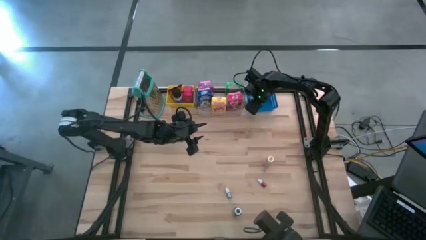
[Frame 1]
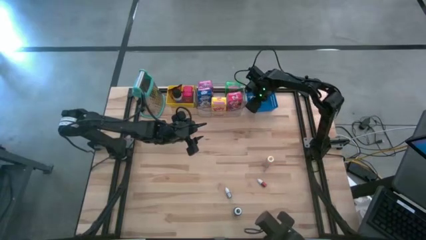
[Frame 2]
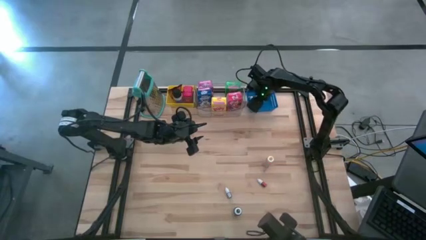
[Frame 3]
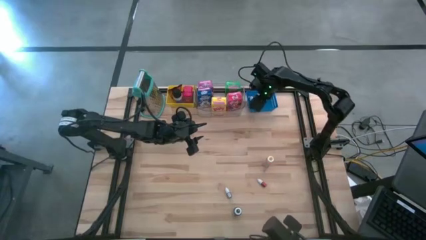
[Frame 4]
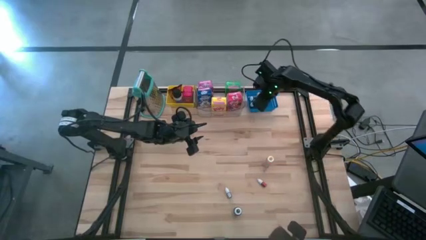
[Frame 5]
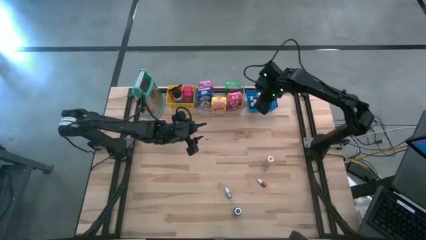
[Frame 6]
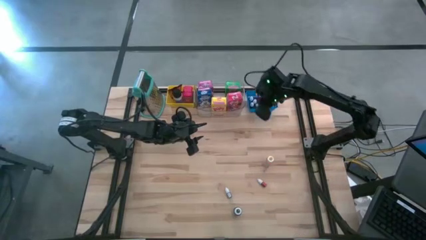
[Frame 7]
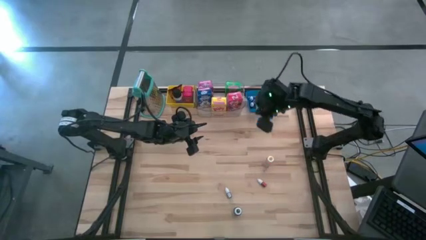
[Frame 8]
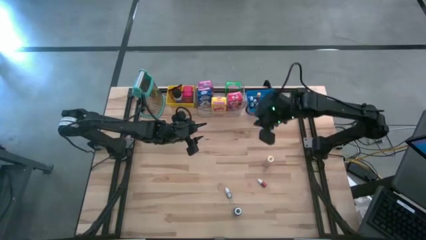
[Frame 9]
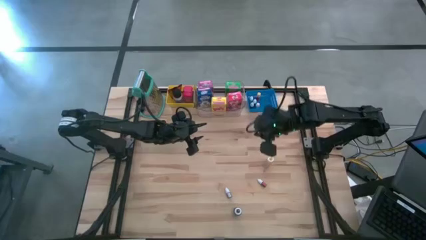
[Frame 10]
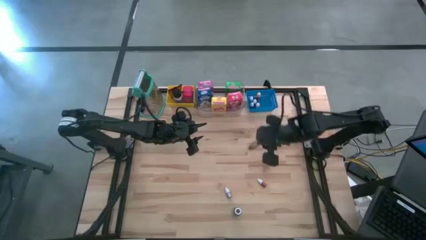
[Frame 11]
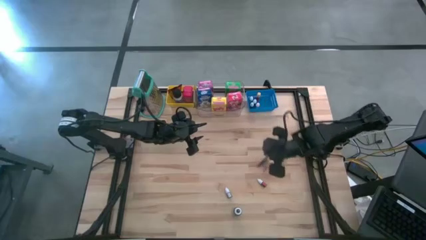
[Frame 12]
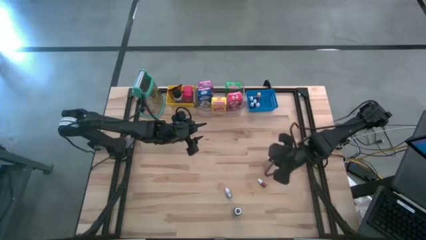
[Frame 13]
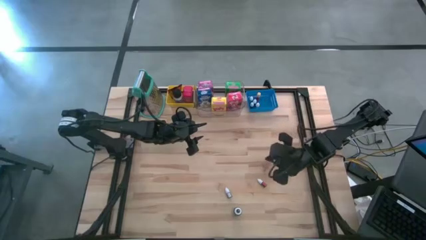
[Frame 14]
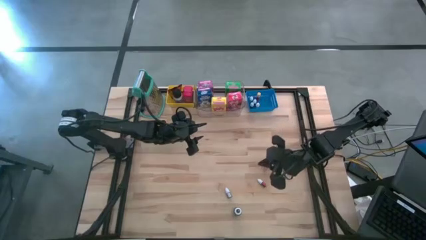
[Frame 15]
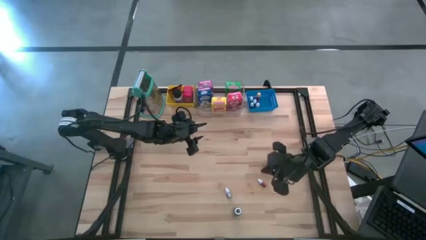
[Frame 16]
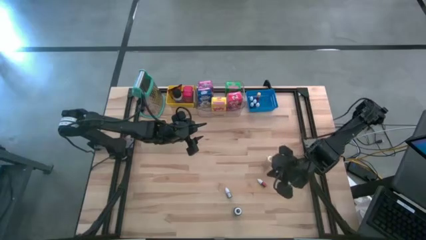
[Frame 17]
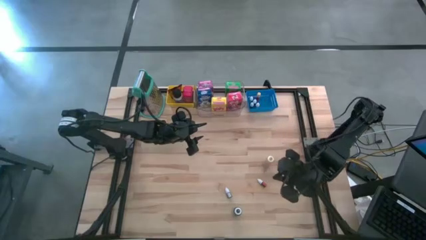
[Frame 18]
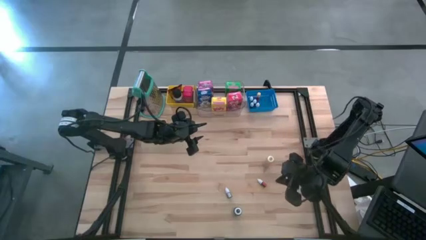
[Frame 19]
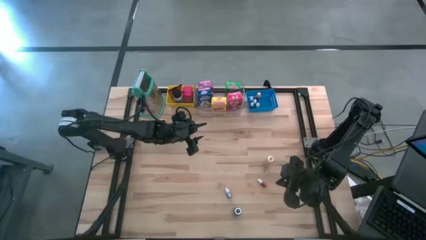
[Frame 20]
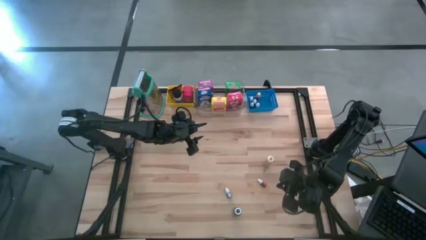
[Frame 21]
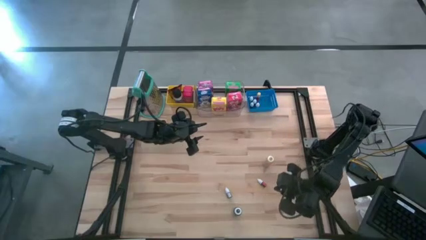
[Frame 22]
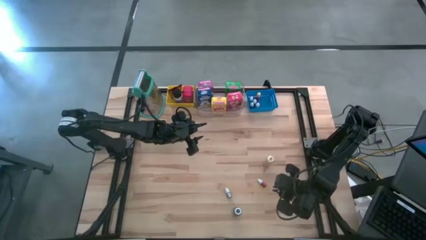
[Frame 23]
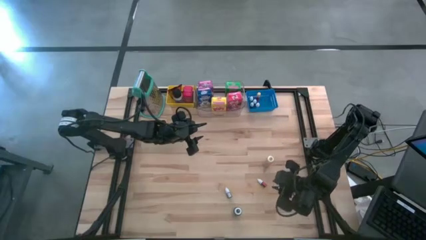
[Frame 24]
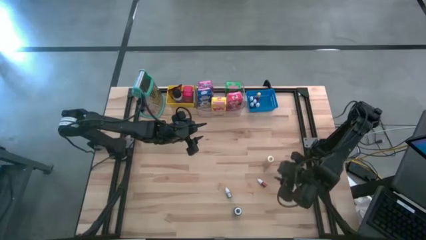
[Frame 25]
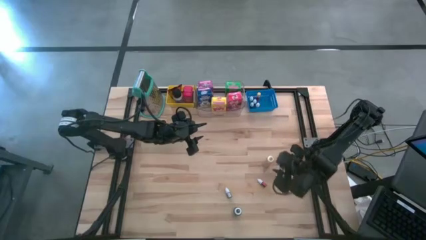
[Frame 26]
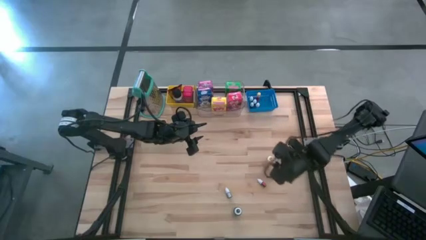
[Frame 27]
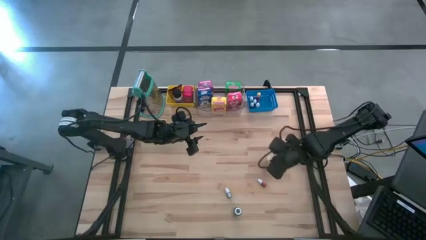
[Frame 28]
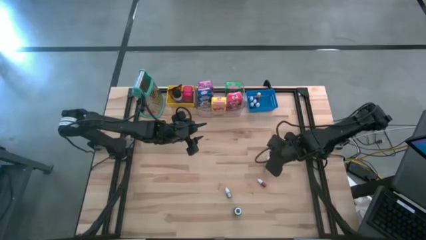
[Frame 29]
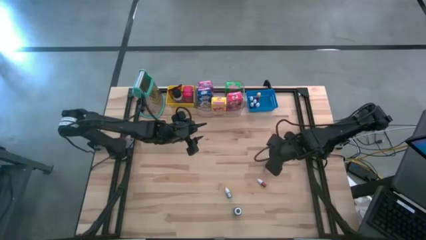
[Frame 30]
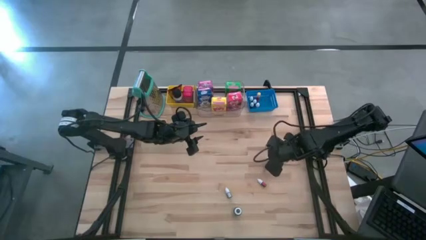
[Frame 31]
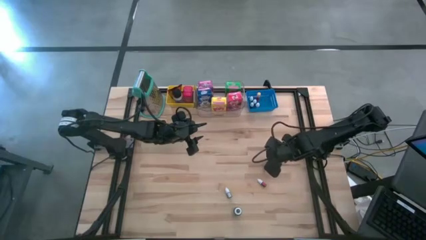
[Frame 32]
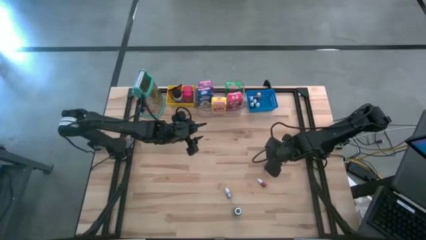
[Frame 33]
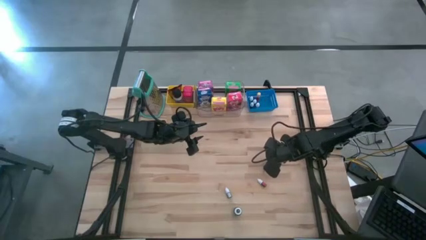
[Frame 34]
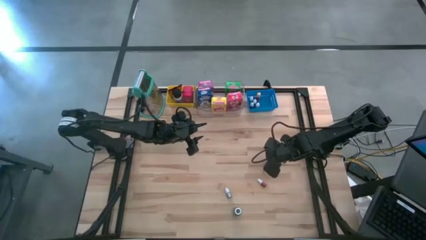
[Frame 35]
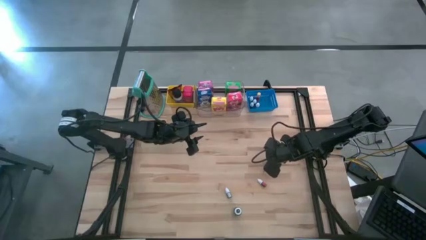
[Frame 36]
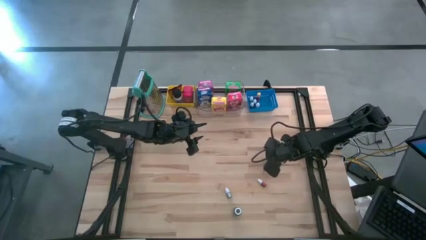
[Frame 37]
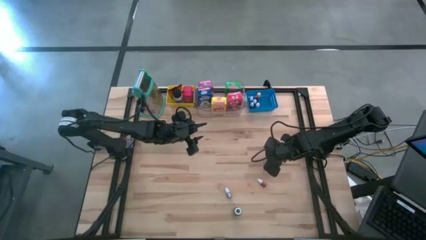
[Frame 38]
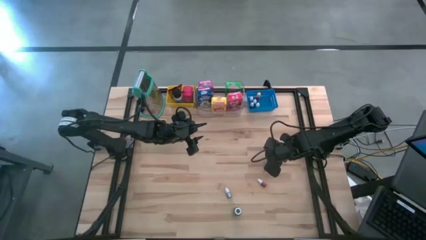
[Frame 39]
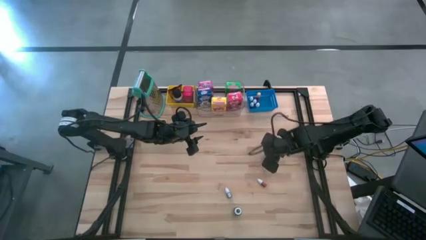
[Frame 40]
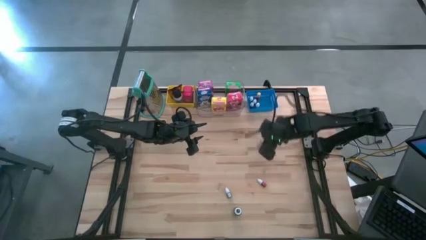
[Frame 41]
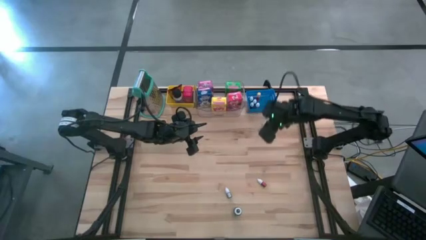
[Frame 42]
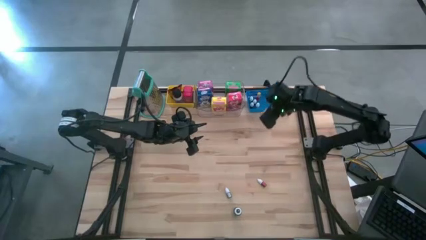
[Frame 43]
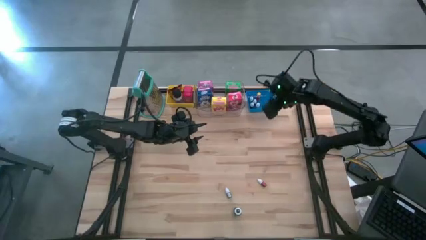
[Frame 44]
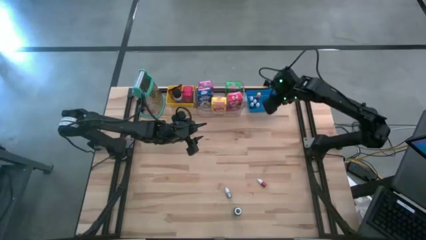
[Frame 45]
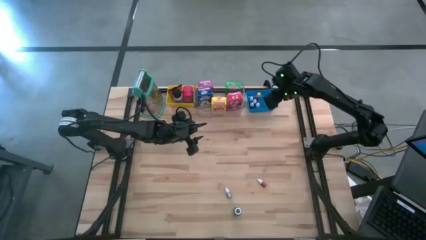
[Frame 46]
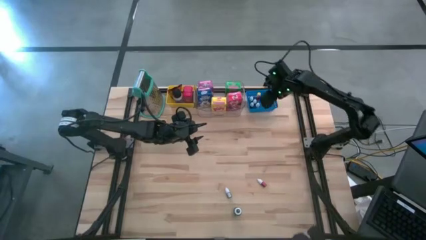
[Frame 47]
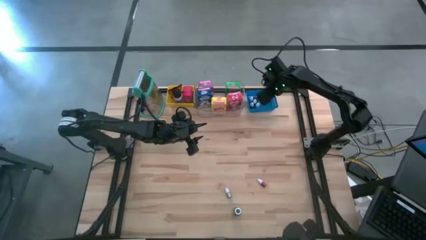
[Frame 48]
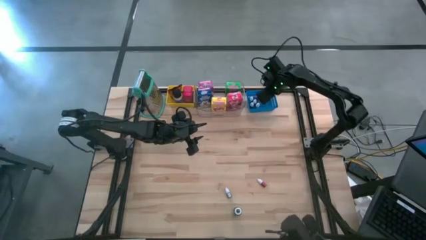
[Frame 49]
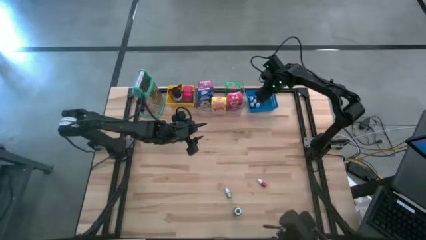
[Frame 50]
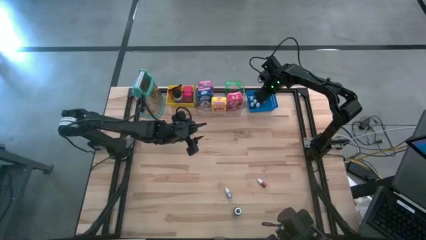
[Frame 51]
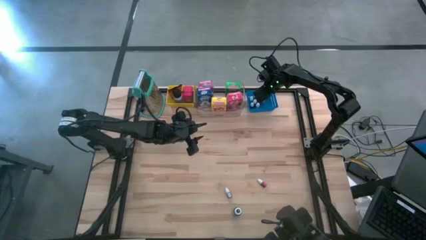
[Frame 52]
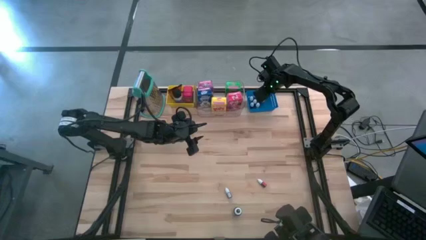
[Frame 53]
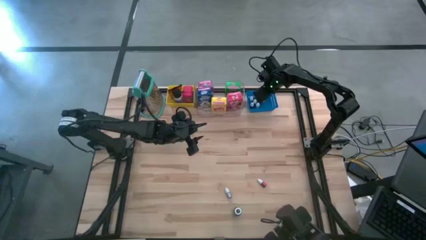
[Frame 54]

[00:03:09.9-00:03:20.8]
Task: Pick & Place Kitchen Items
Put the yellow bottle into the blue bin
